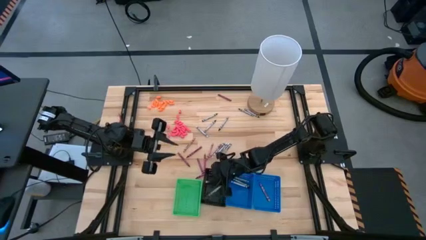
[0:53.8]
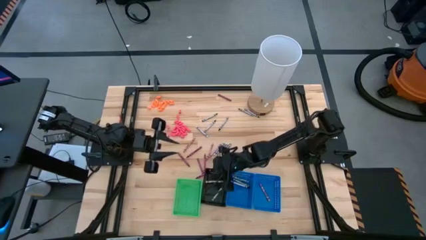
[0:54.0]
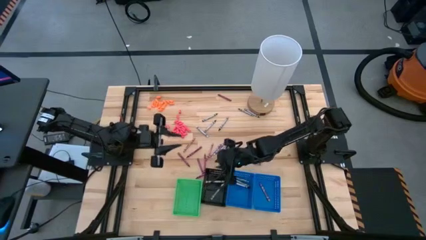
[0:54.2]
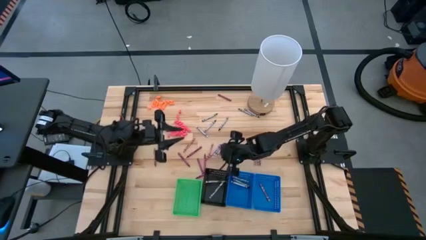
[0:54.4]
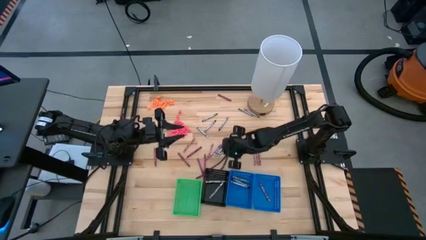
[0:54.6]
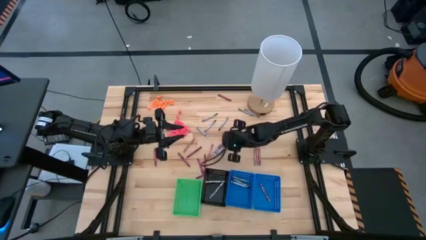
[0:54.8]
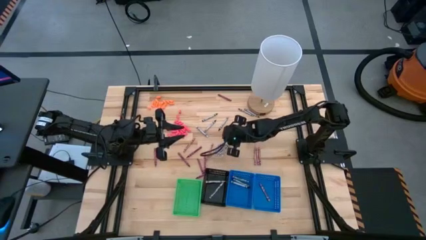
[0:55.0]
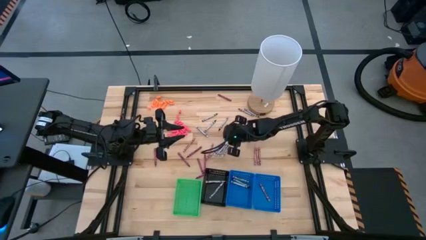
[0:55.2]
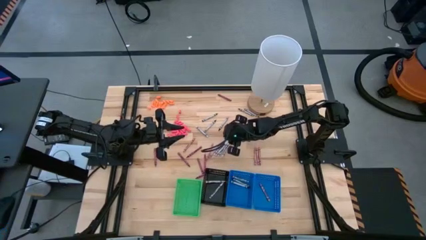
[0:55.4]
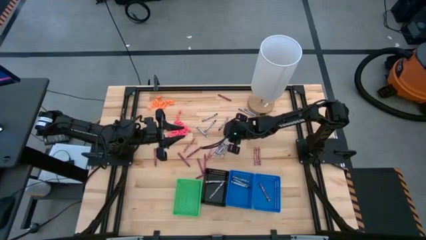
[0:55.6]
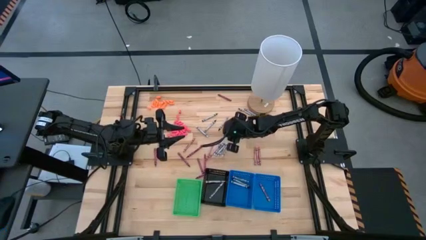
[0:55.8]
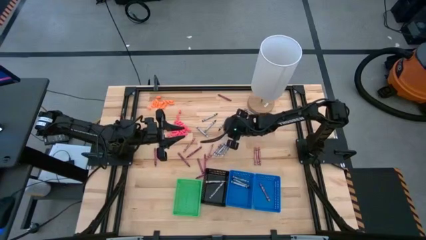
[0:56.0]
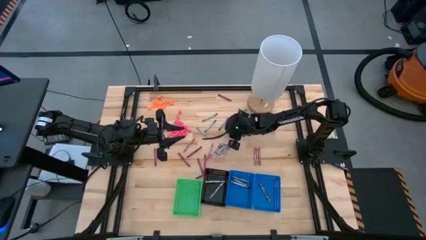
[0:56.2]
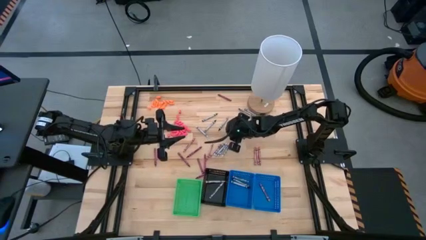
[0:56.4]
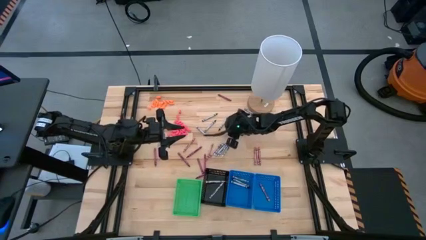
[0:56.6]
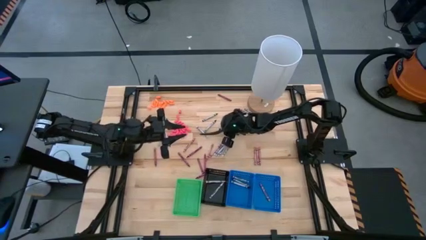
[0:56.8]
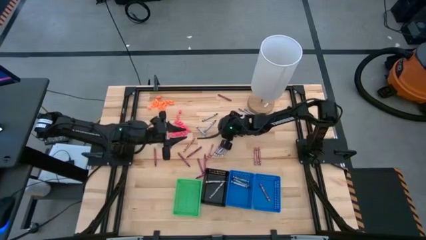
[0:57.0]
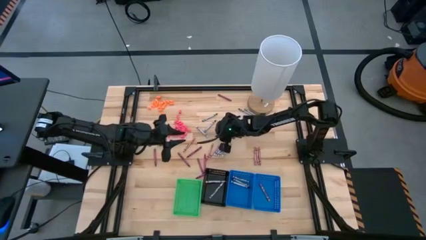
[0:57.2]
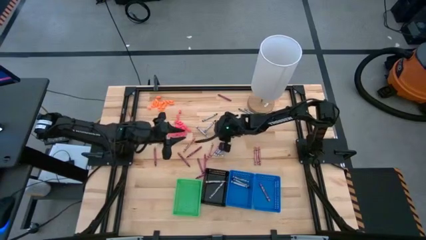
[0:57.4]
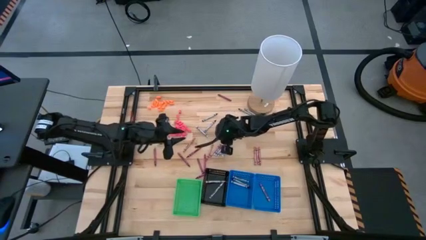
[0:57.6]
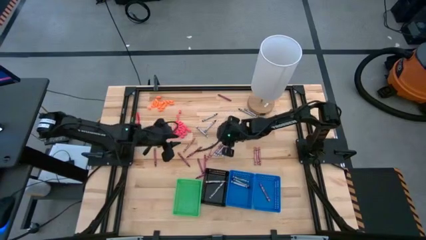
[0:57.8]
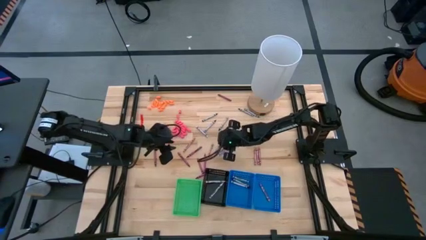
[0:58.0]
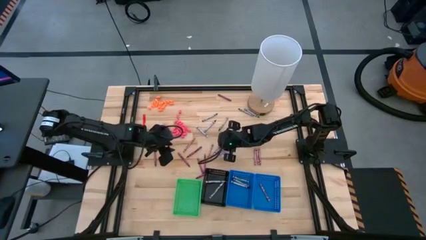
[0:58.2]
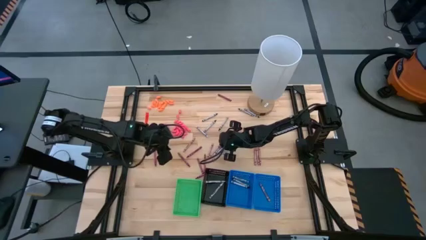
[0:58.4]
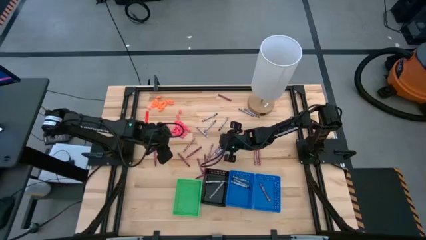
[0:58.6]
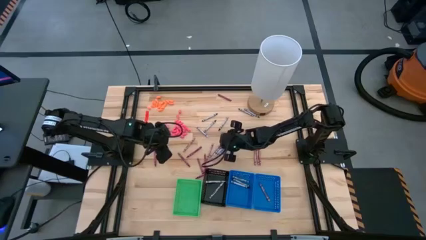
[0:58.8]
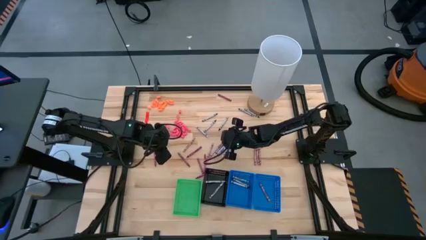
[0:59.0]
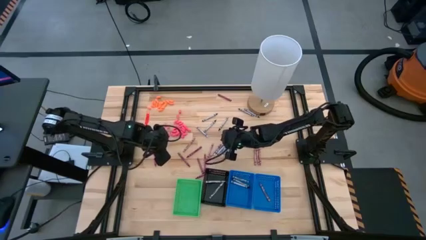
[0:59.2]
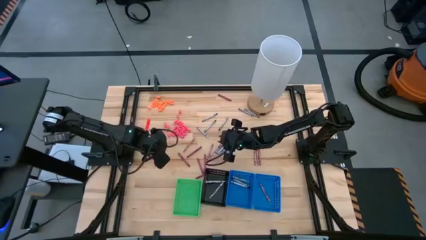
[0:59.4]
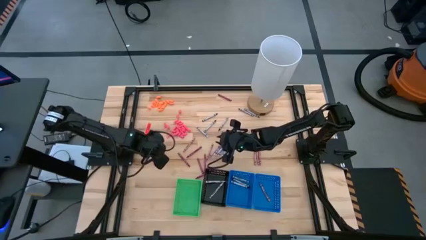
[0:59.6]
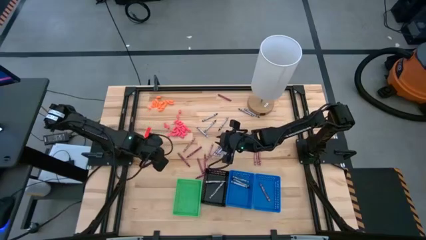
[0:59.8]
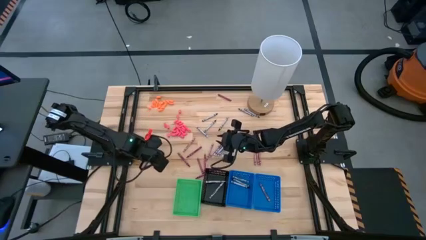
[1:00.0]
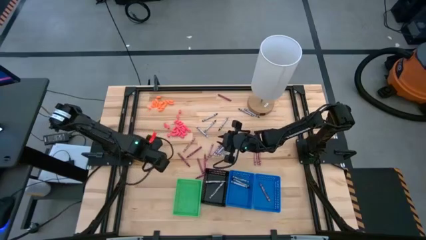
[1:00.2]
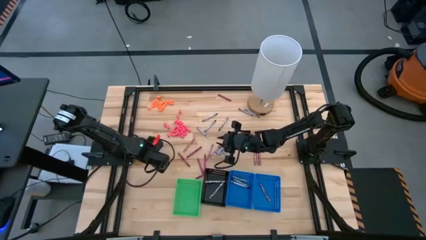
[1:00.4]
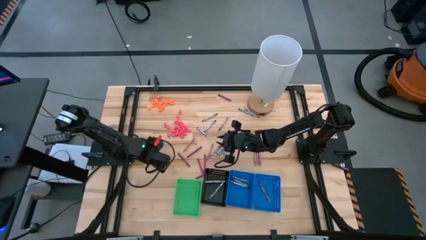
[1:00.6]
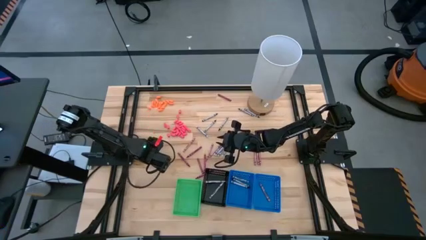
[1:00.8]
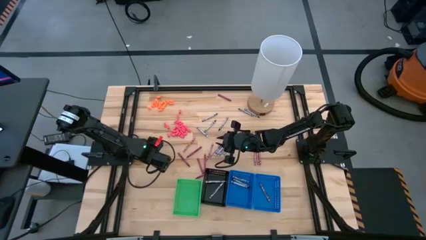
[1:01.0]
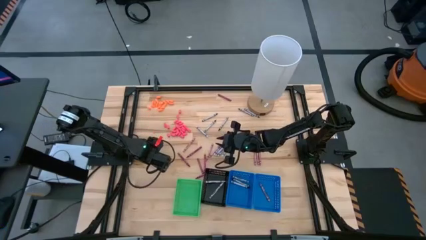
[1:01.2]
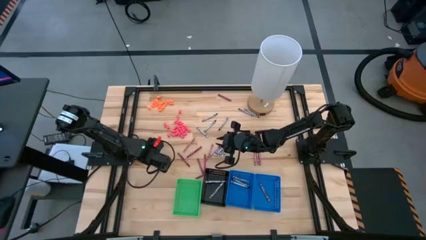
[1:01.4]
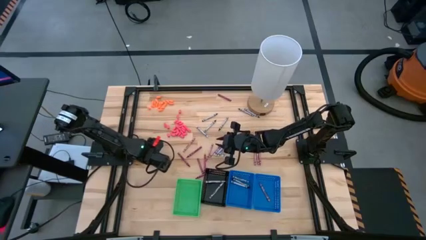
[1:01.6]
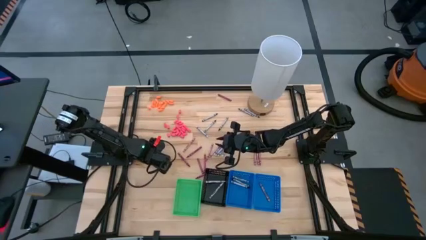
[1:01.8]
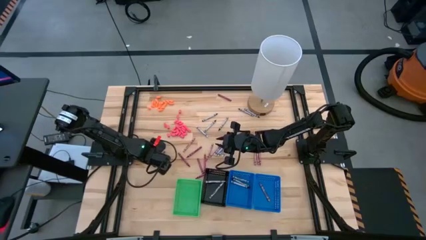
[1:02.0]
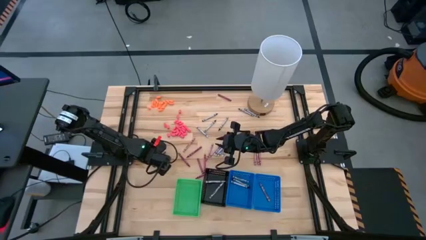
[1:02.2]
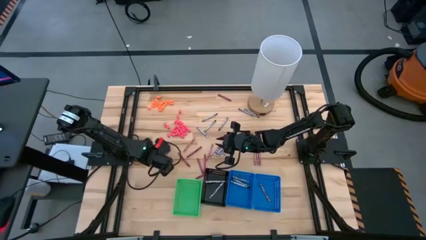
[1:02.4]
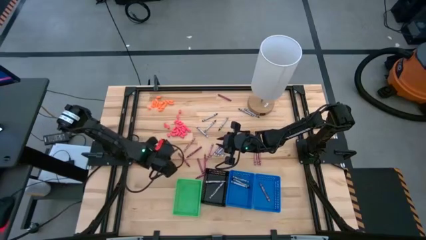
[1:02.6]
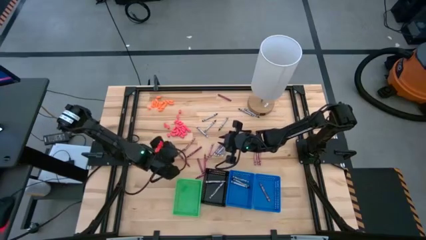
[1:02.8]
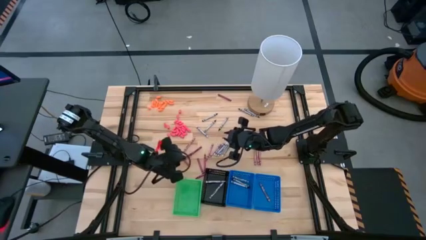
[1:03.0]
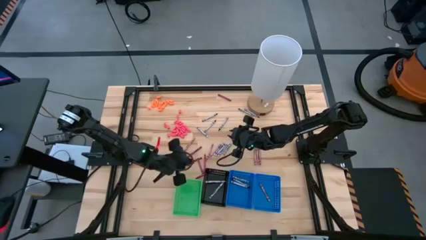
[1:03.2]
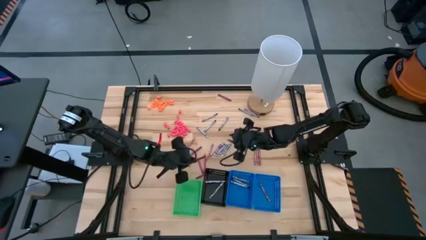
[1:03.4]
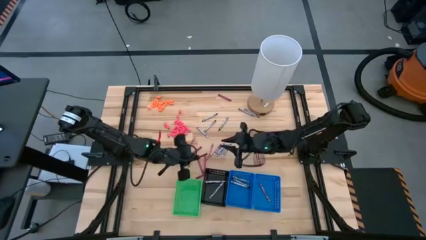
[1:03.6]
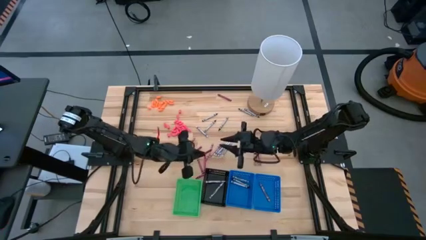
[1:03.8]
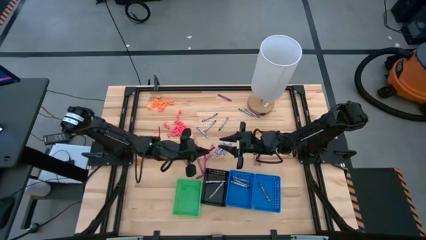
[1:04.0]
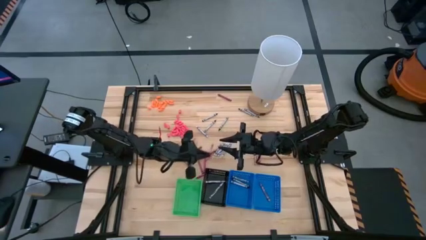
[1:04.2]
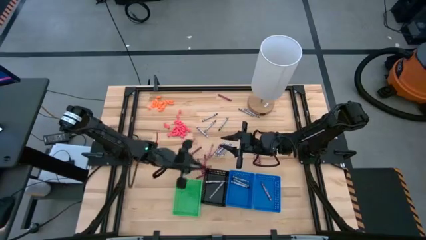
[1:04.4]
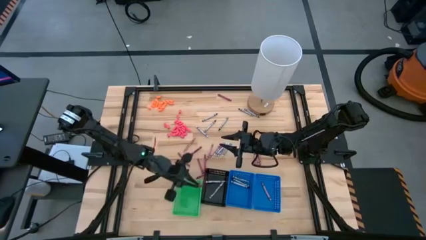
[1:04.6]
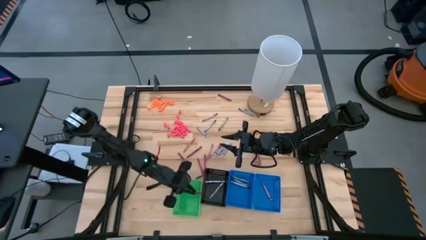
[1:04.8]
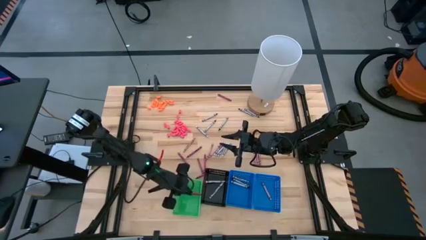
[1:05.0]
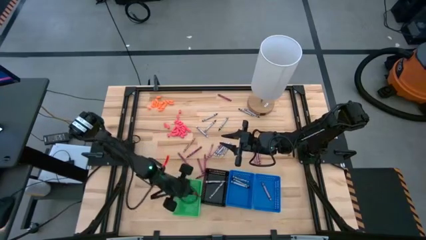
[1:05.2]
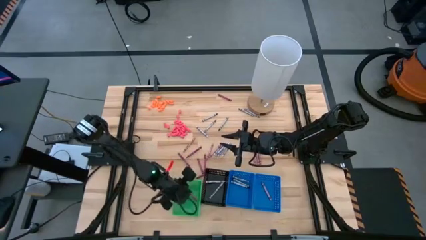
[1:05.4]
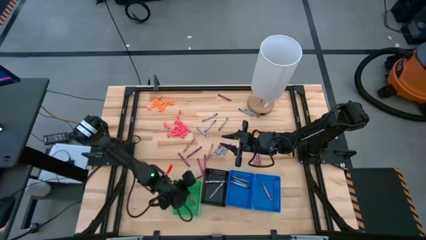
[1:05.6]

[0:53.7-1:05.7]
Task: Sort crayons
Put the red crayon into the green bin

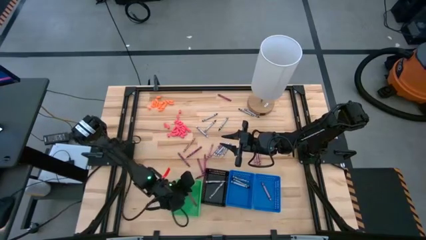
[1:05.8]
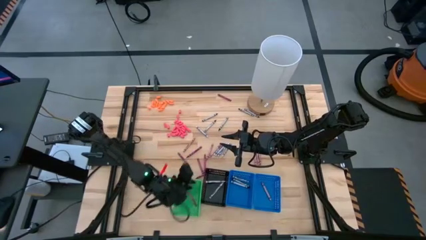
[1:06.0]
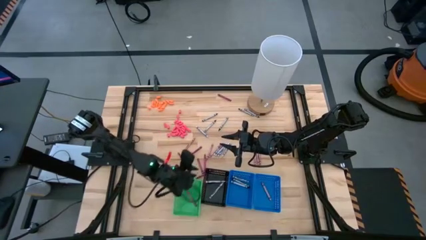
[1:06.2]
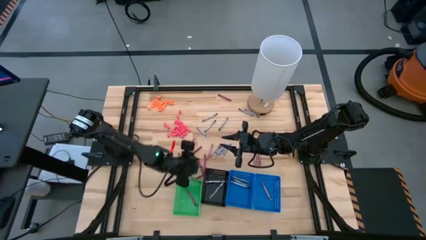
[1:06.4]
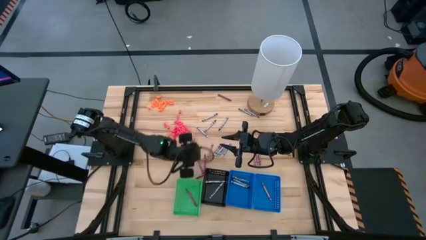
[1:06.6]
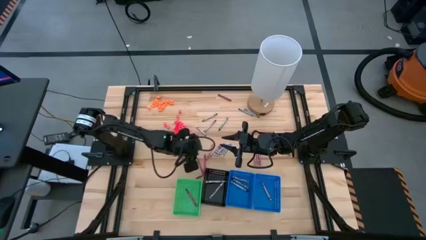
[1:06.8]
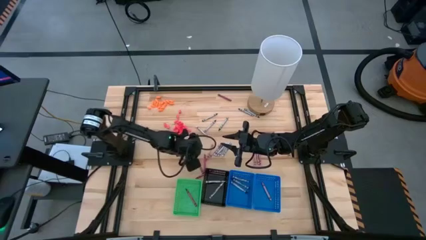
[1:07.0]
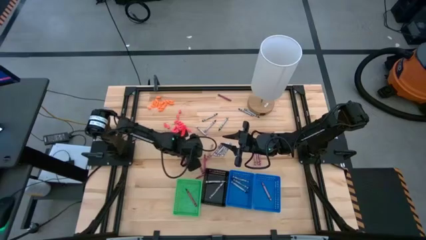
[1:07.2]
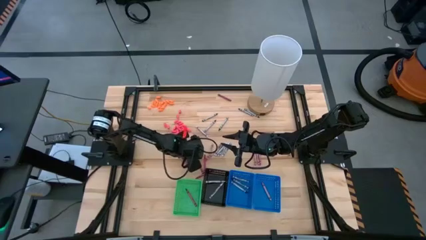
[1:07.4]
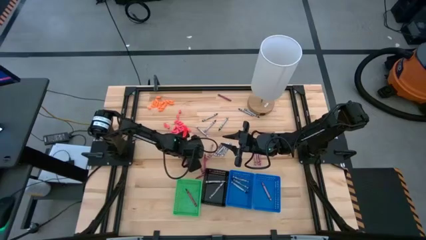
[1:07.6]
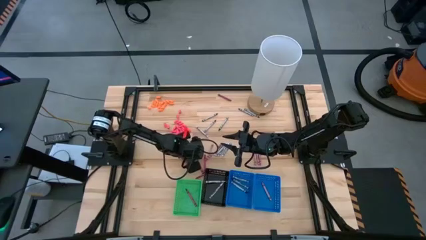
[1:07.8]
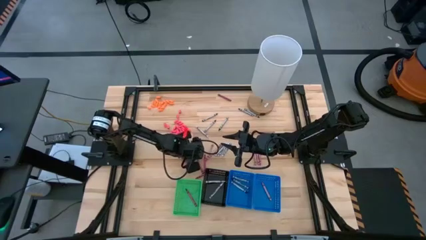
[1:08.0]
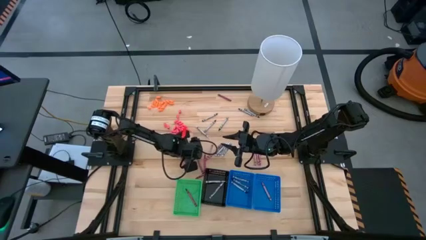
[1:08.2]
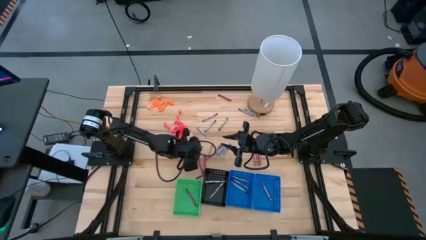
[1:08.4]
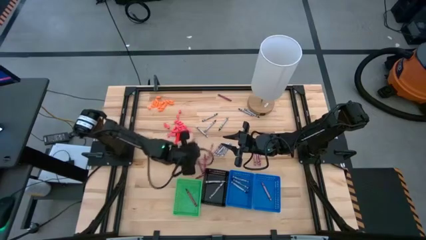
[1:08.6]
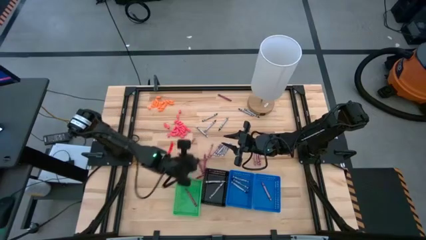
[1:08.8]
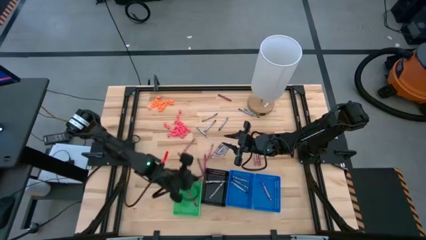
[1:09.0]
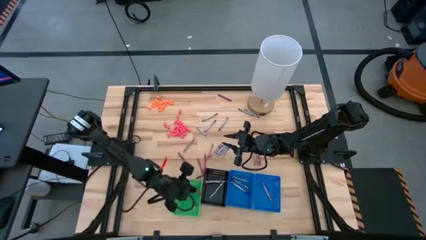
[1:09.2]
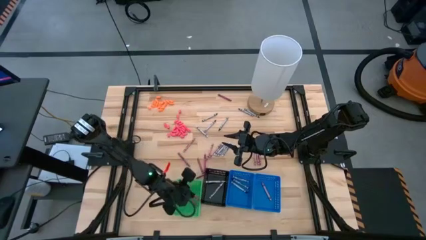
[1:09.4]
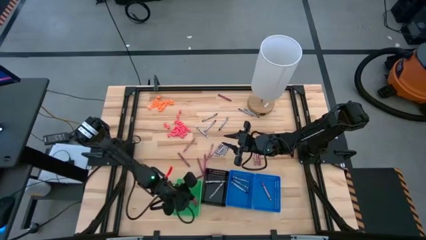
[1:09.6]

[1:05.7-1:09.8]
Put the red crayon into the green bin
